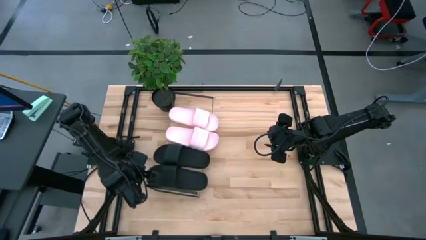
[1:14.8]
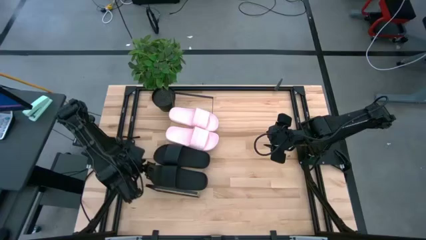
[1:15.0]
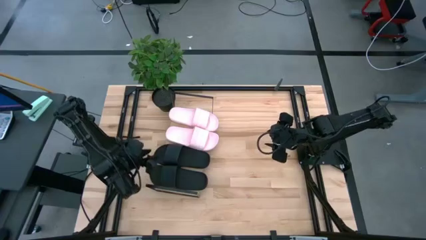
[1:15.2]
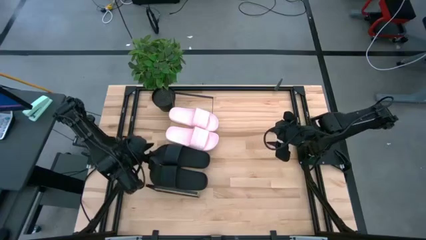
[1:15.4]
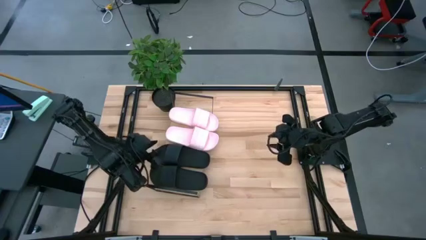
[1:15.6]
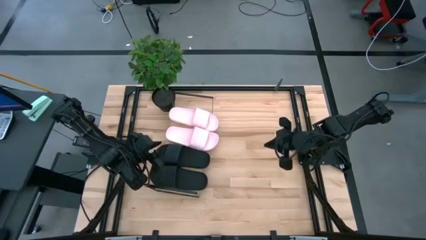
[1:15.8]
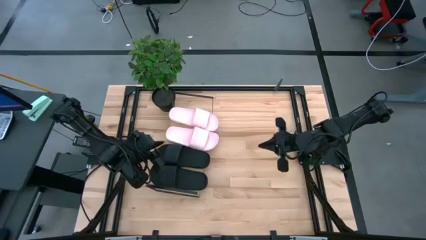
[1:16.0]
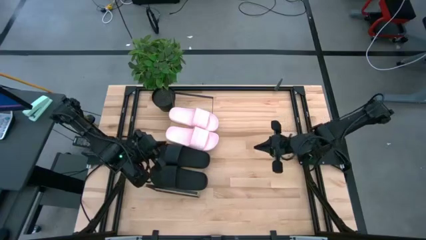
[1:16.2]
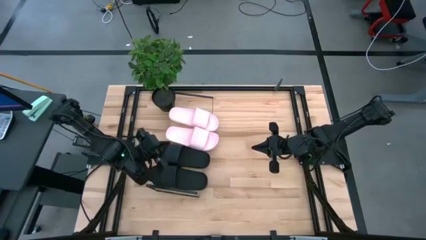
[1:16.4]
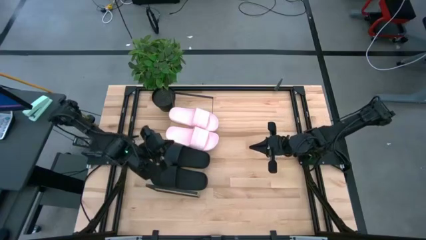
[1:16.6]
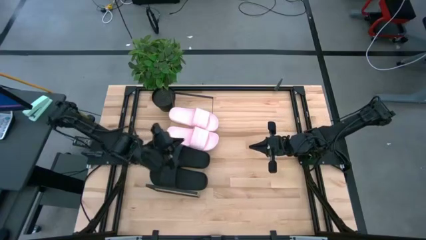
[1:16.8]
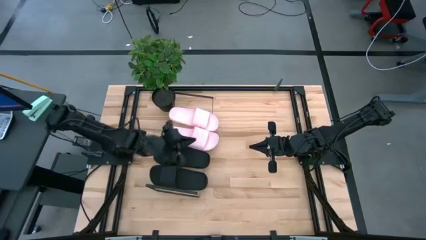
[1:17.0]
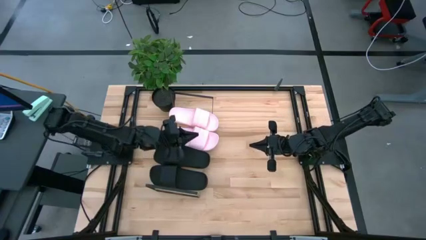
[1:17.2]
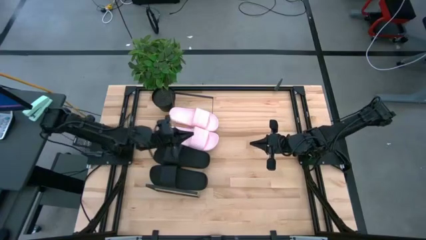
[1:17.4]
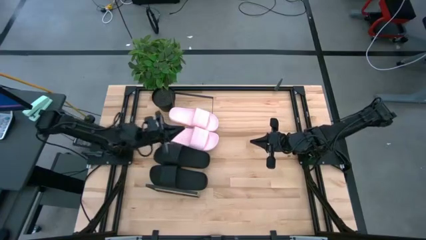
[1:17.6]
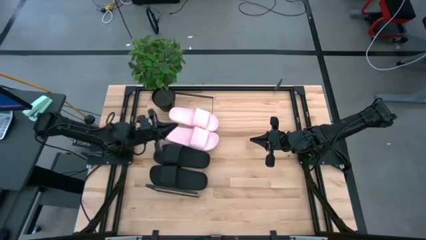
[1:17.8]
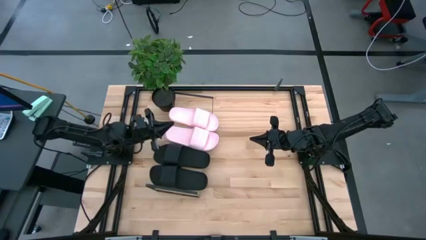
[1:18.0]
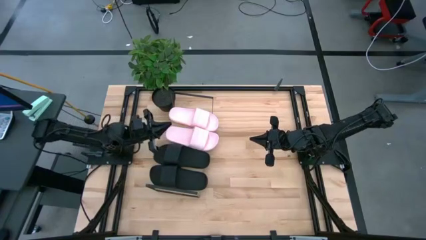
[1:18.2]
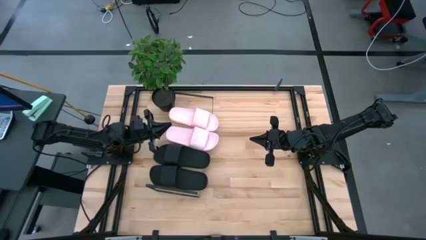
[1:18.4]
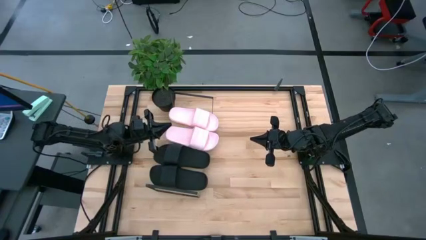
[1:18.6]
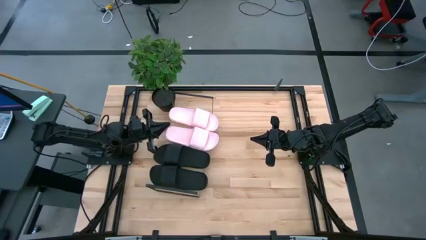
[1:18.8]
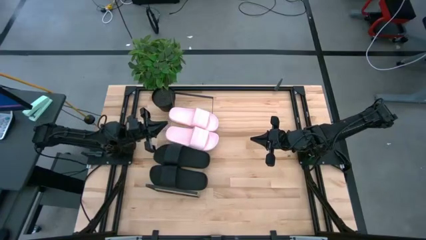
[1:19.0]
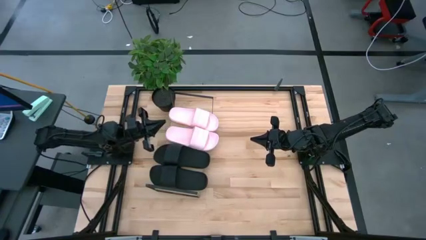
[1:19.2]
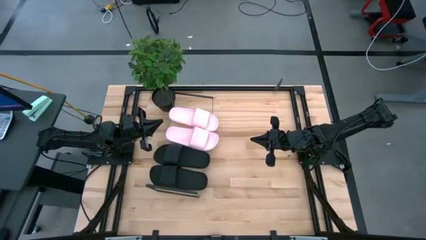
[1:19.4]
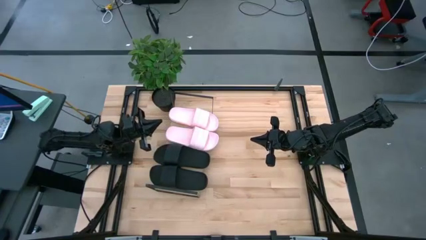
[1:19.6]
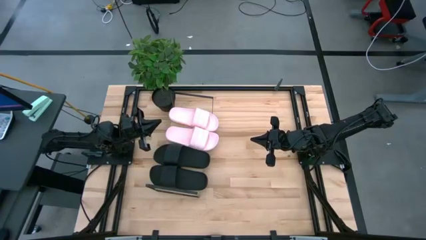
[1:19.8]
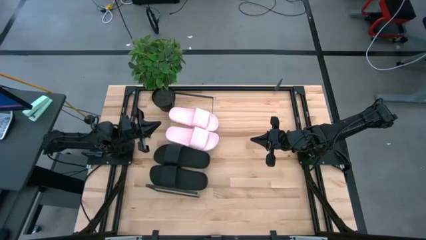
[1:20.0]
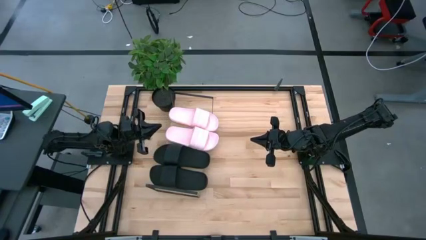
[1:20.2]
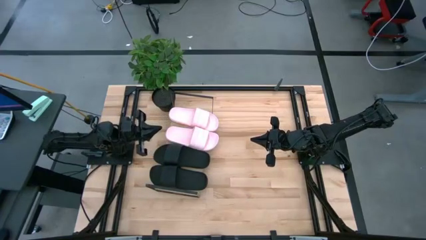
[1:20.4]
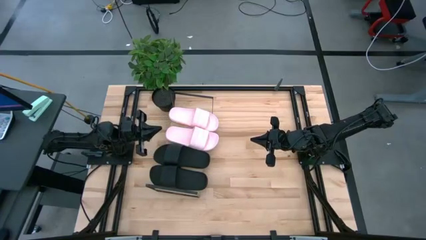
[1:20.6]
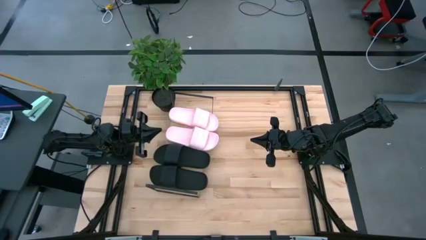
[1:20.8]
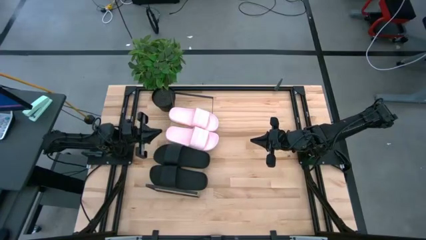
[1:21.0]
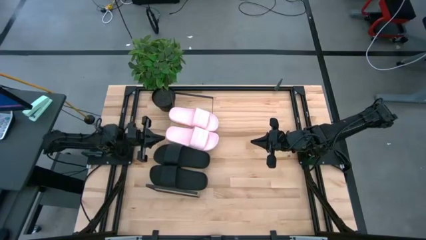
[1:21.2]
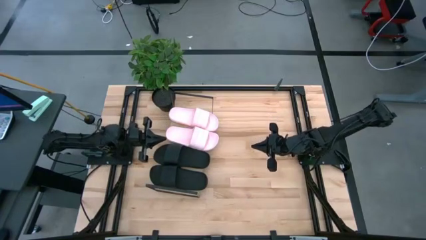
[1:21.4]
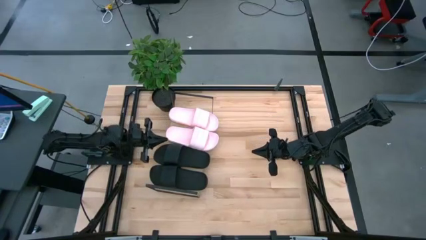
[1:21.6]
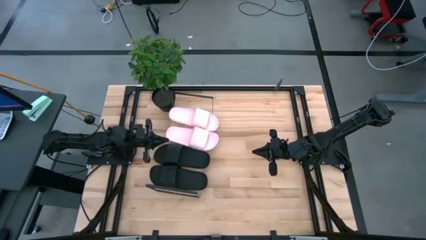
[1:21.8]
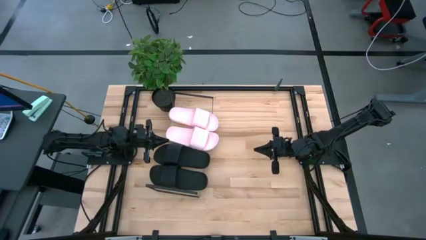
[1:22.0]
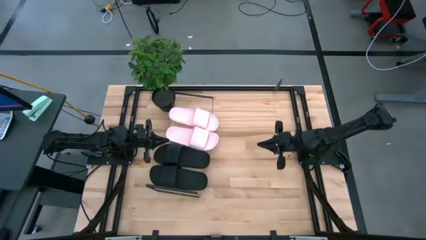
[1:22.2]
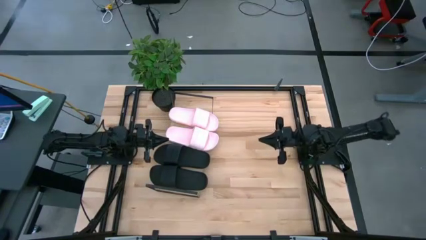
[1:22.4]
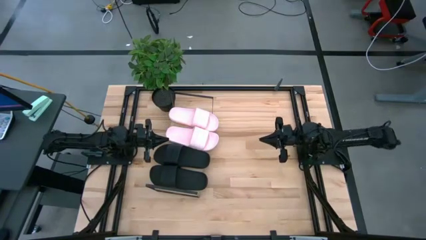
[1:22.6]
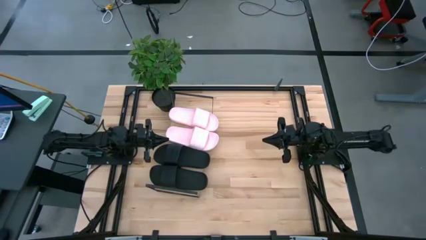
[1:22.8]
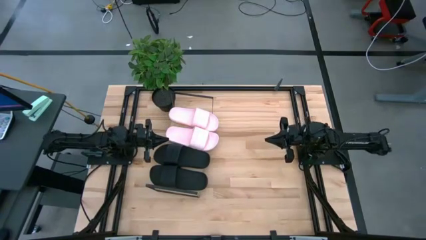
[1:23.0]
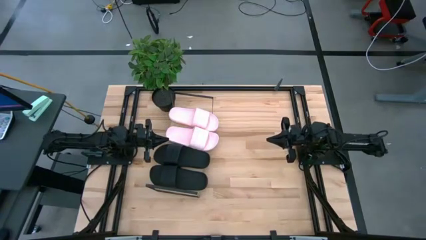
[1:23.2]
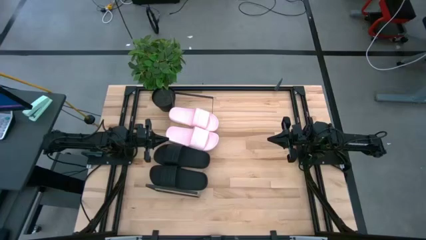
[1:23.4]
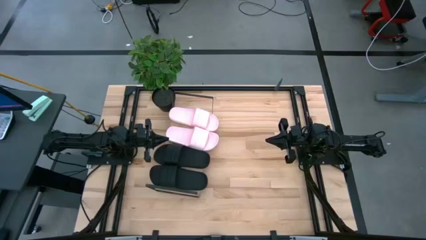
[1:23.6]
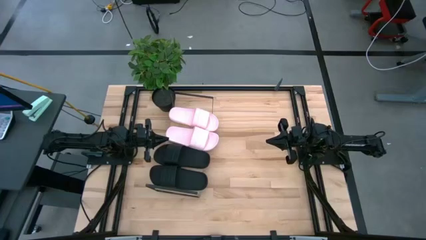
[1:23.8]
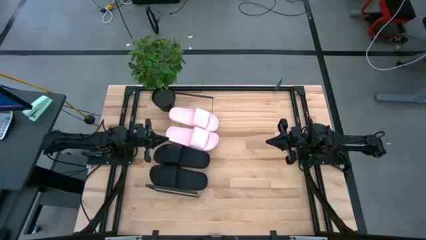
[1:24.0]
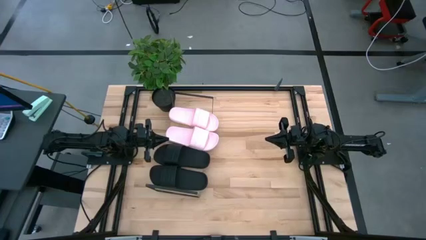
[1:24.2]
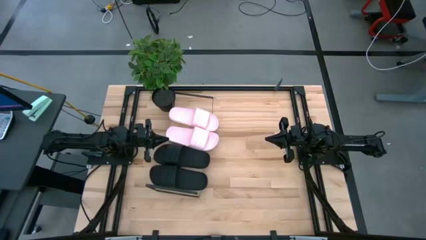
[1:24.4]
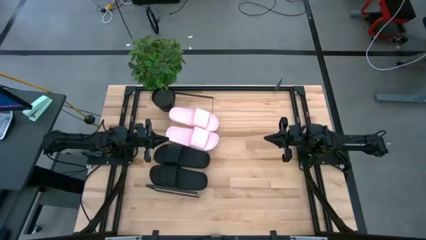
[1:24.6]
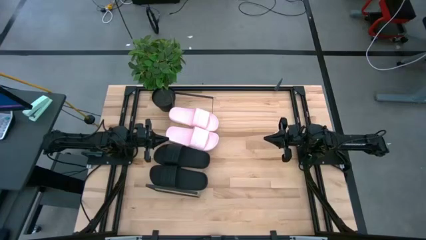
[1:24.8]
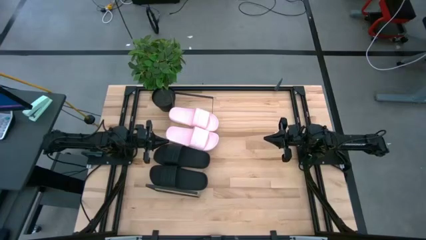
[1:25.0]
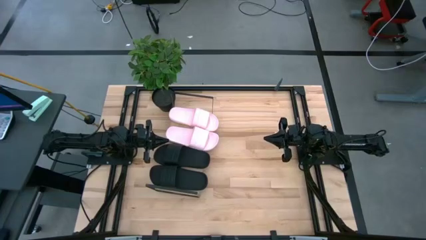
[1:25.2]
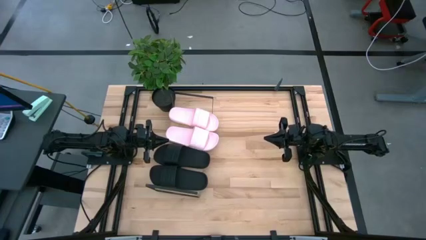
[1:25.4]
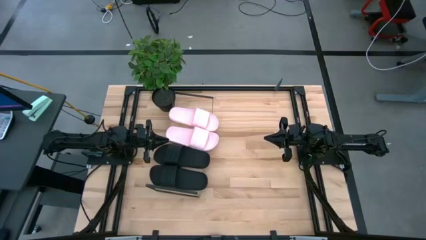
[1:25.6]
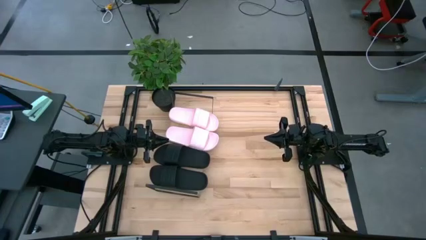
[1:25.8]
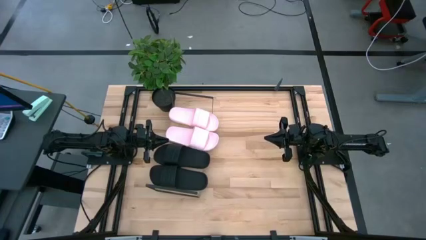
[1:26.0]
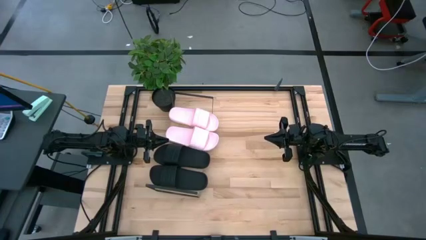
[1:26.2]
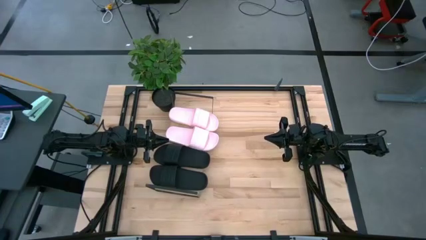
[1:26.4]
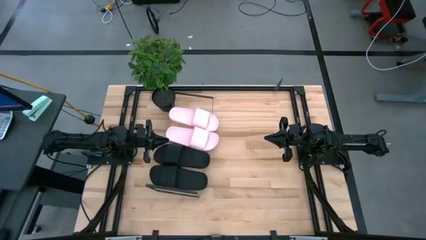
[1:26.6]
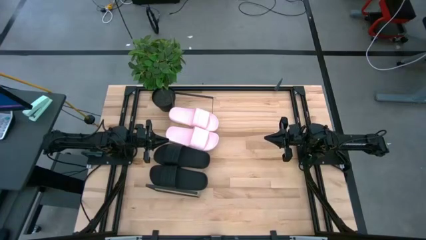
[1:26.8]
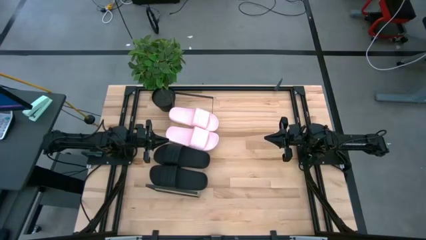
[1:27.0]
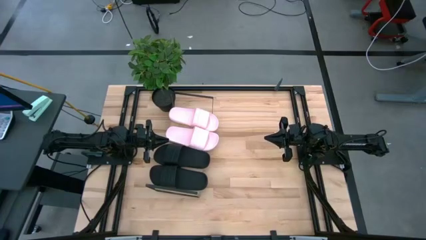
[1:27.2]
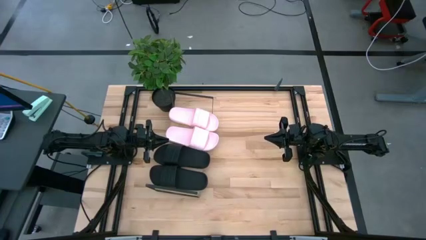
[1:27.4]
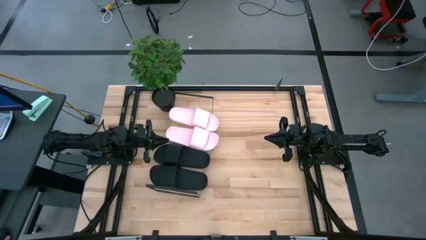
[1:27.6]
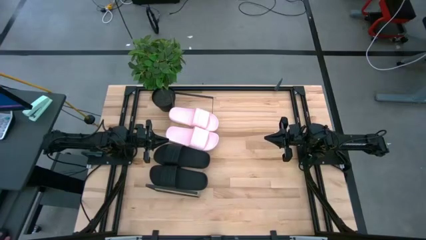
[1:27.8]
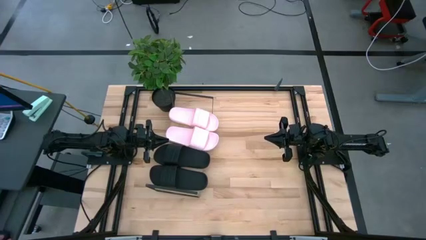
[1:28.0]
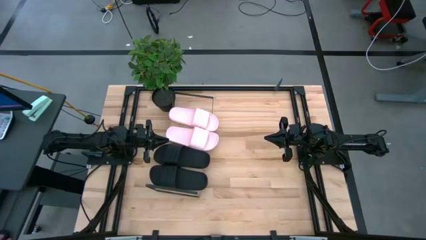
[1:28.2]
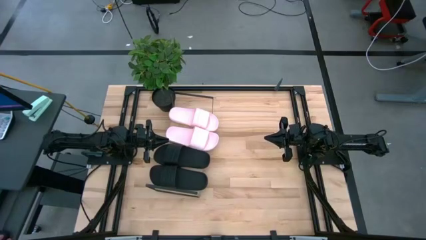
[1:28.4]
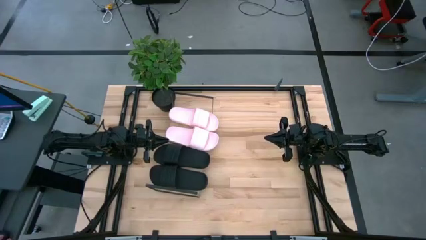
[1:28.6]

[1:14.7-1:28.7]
Task: Pick and place slides into the shelf
Return to Home Position
